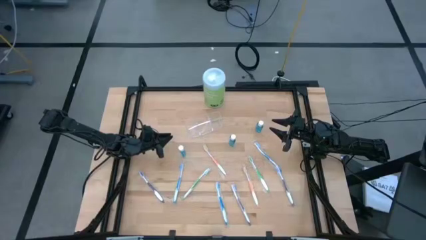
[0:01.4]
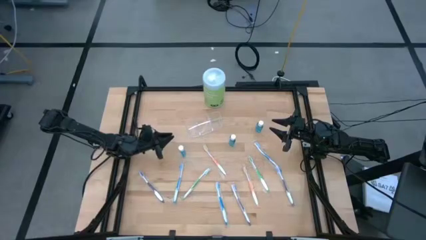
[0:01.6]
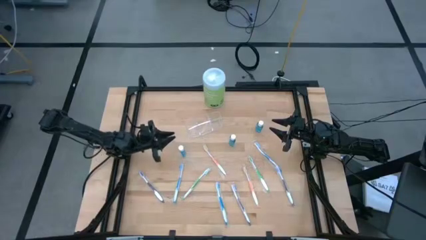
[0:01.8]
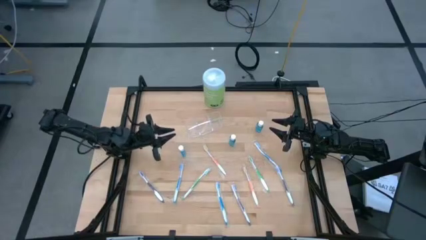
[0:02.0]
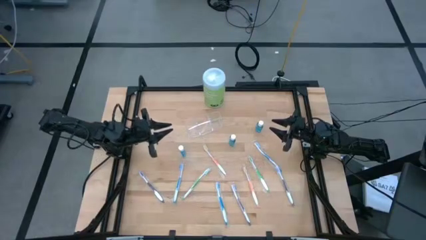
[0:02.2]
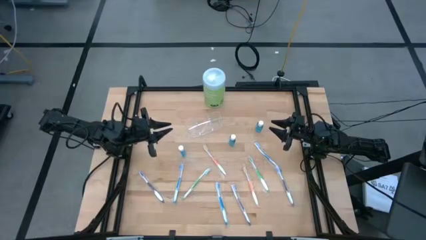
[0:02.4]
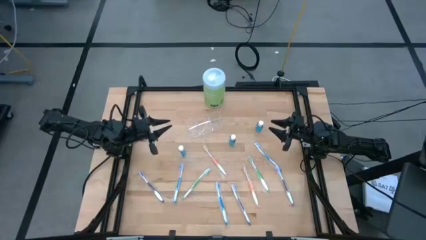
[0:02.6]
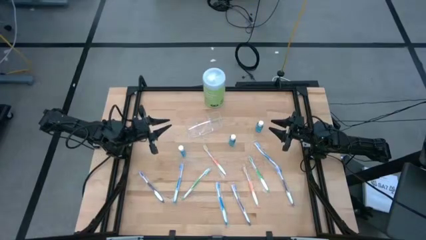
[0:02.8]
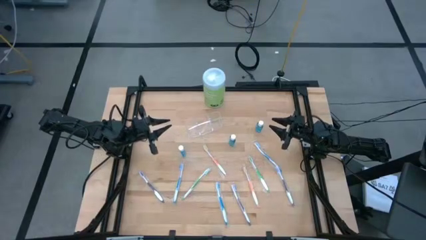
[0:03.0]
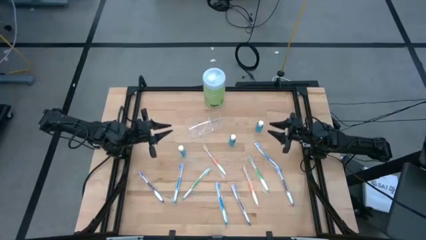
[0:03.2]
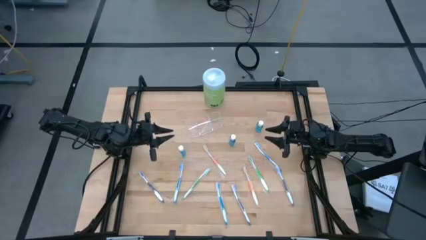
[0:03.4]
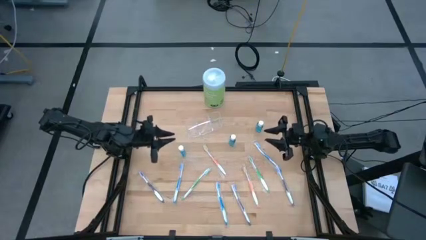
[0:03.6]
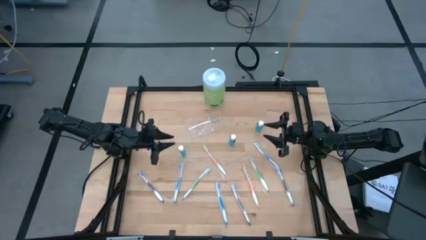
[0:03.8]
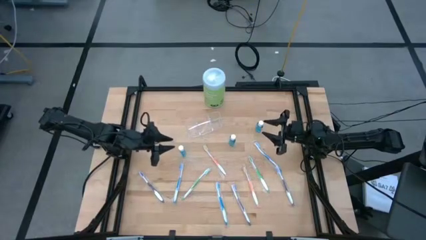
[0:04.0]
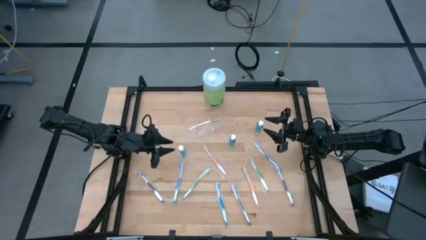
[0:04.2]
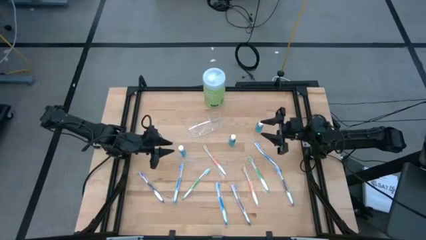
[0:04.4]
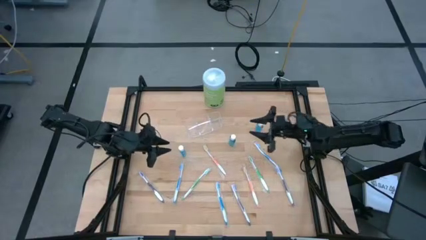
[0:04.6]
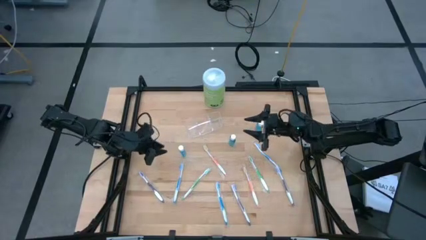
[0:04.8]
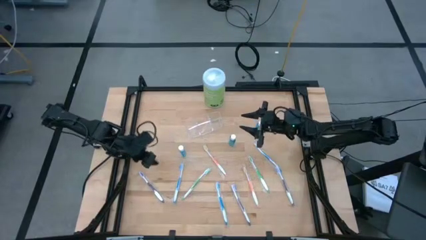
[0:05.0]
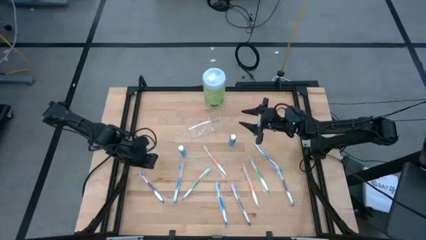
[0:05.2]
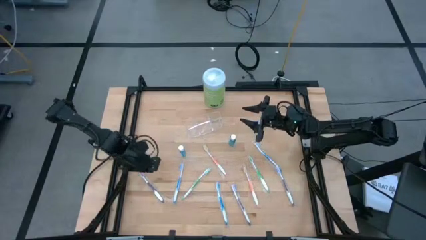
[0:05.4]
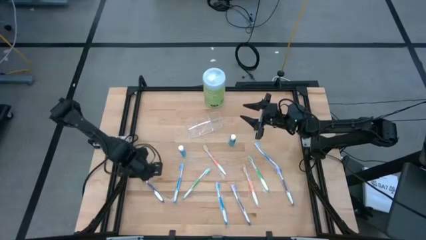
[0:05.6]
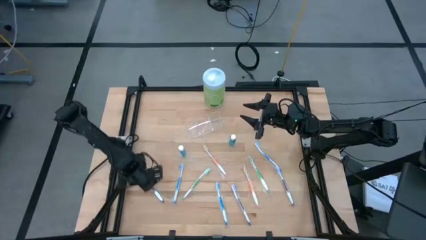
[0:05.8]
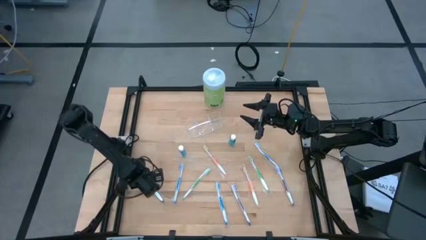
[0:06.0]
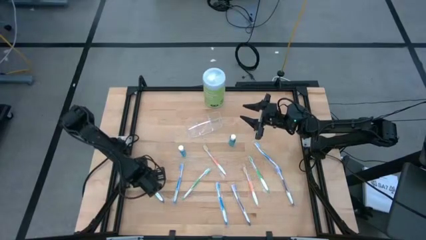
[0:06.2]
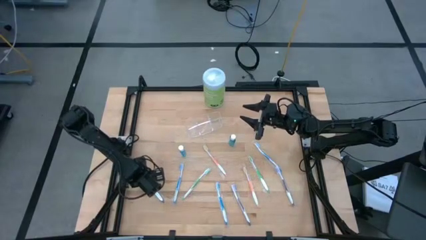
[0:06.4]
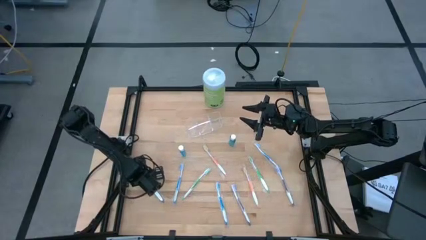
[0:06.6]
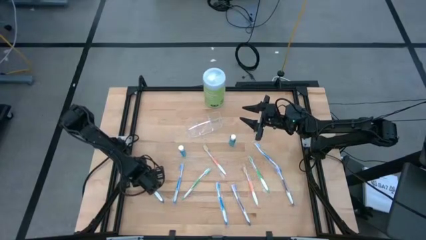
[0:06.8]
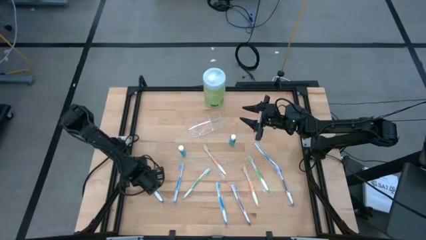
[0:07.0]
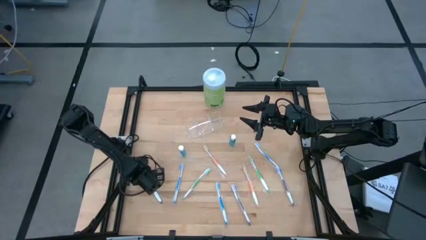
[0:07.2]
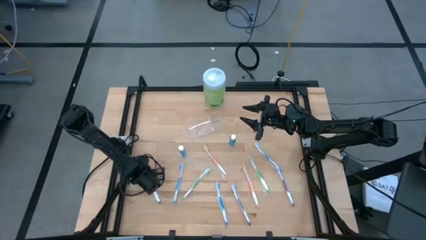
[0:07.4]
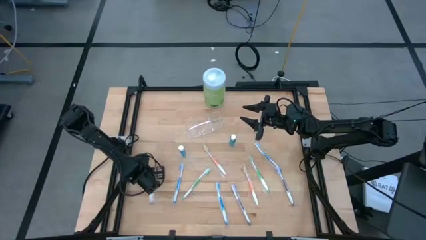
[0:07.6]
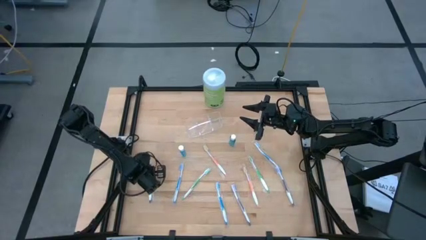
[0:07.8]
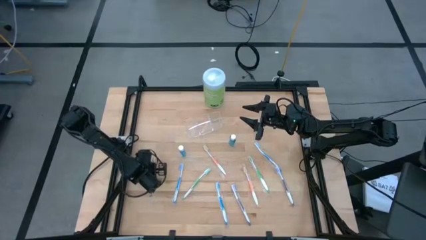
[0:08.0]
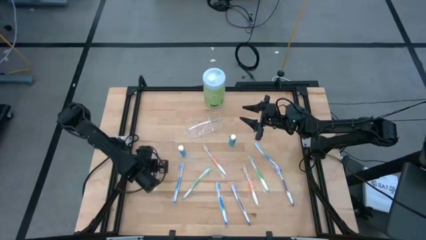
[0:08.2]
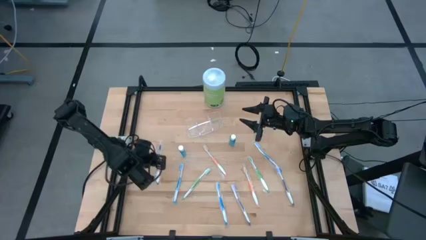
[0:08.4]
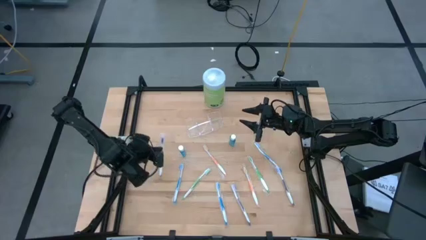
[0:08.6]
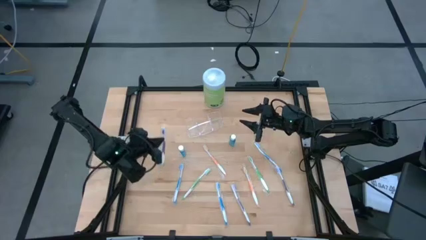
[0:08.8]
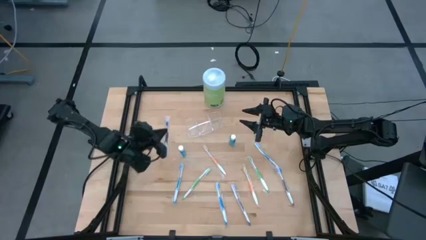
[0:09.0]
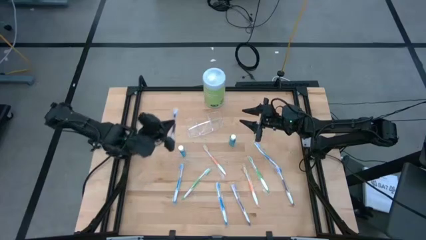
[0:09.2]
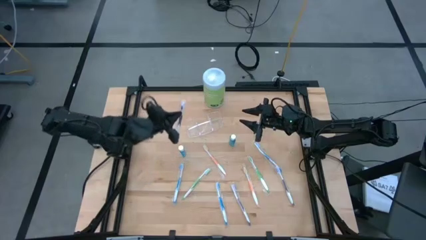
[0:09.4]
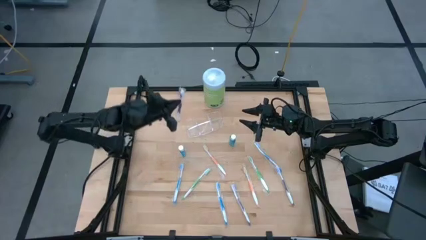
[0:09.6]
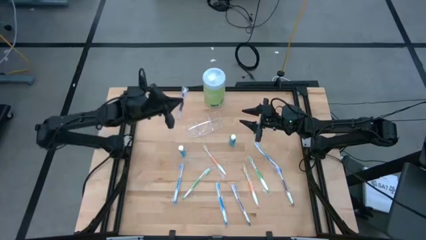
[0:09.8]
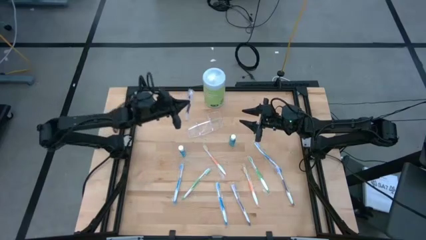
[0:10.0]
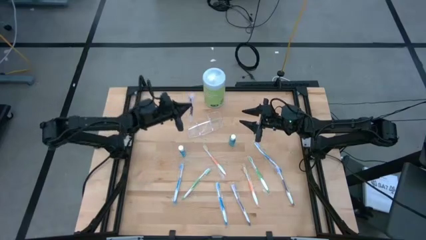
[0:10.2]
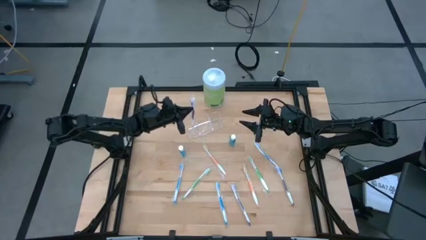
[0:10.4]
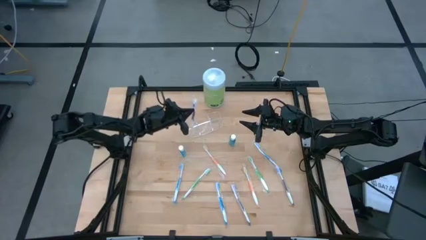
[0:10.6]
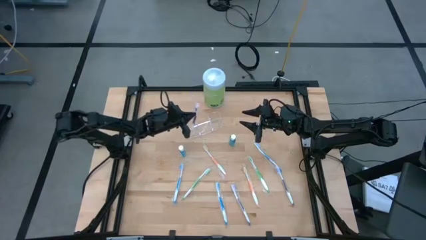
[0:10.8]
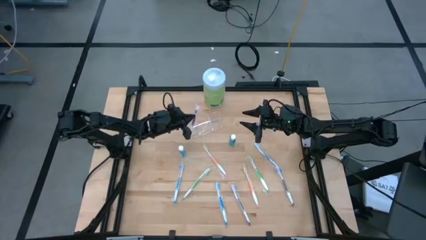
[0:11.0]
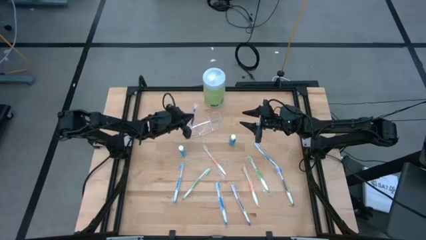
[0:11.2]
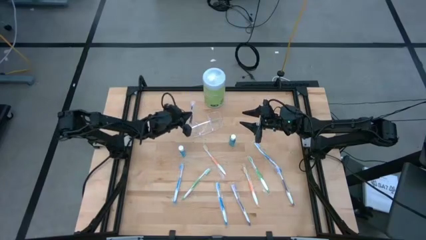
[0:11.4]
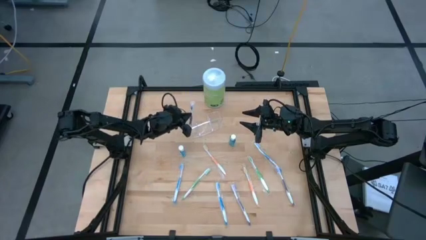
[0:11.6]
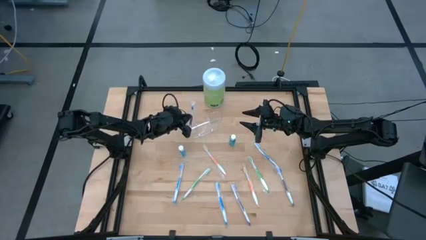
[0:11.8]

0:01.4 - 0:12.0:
Task: Pick & Place toothbrushing station
Put the left purple toothbrush into the transparent organizer

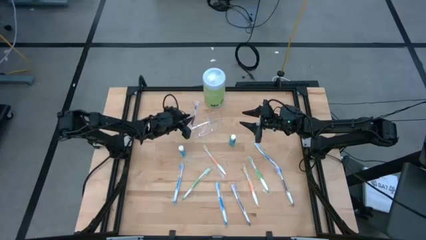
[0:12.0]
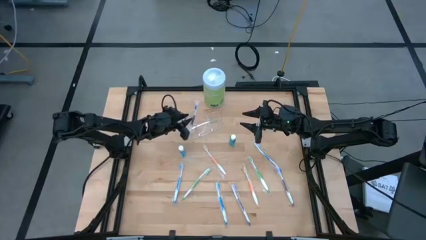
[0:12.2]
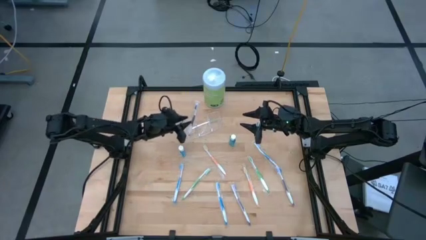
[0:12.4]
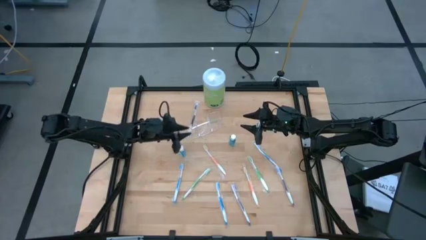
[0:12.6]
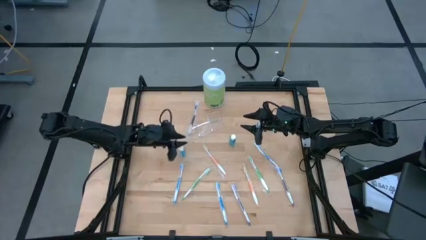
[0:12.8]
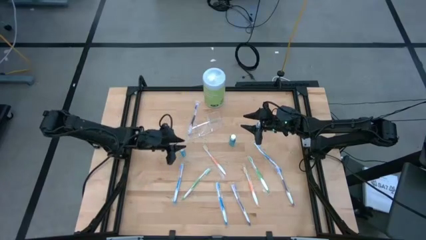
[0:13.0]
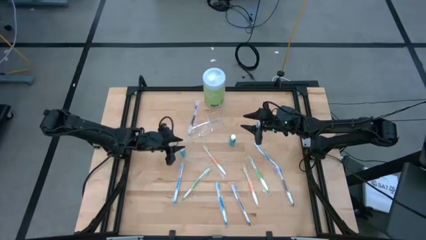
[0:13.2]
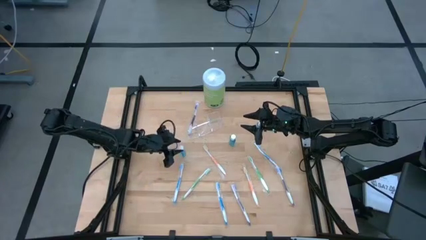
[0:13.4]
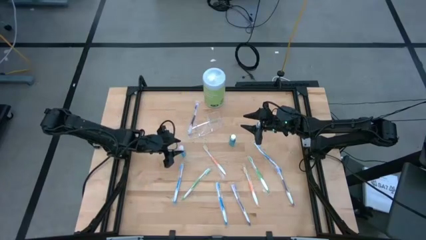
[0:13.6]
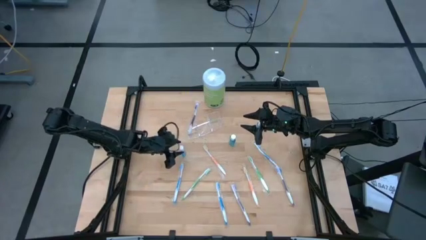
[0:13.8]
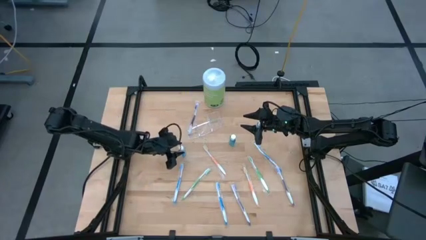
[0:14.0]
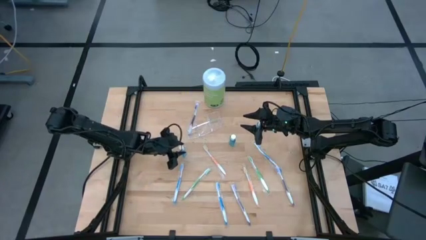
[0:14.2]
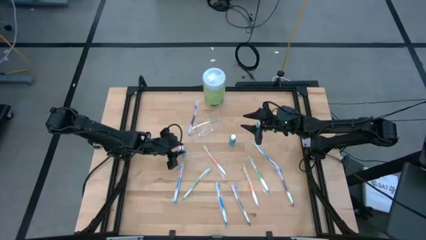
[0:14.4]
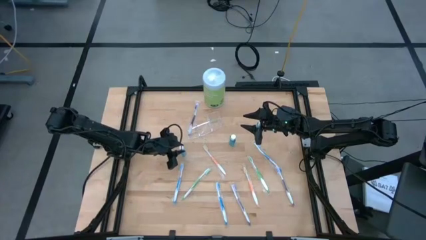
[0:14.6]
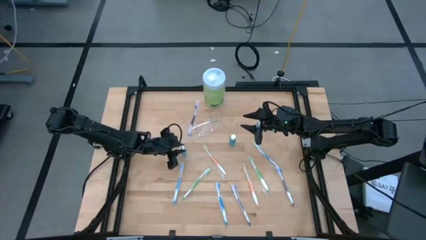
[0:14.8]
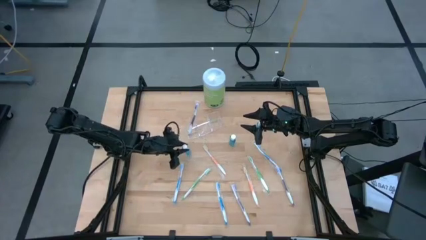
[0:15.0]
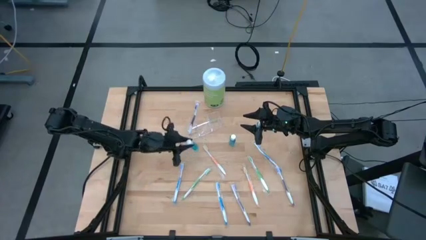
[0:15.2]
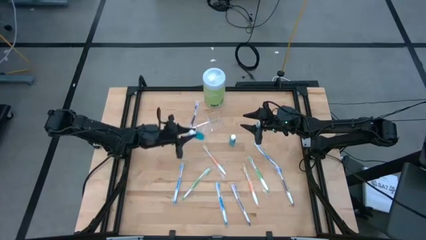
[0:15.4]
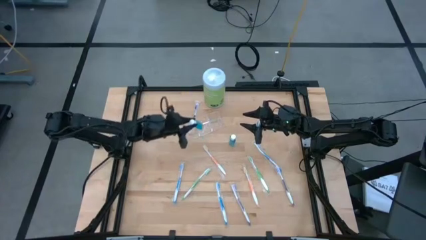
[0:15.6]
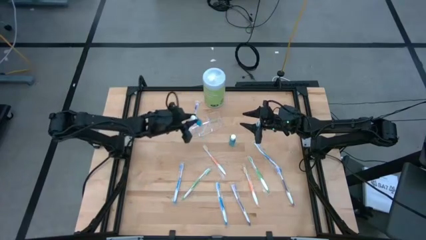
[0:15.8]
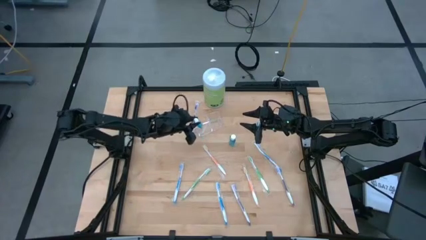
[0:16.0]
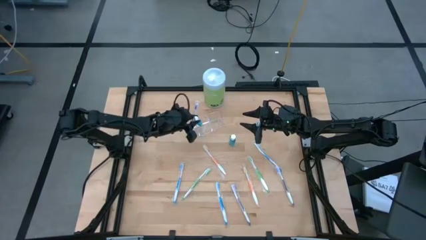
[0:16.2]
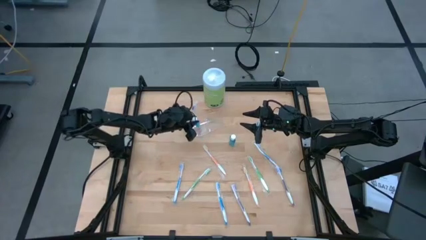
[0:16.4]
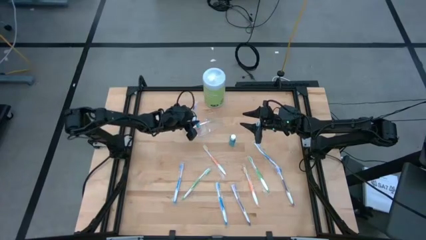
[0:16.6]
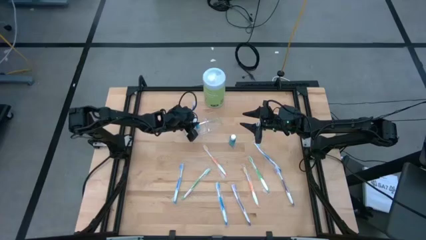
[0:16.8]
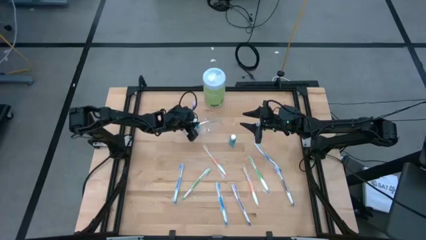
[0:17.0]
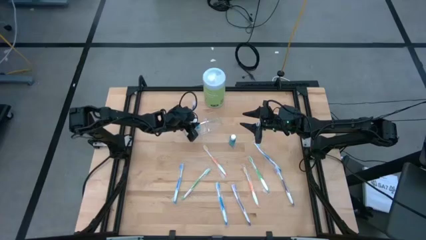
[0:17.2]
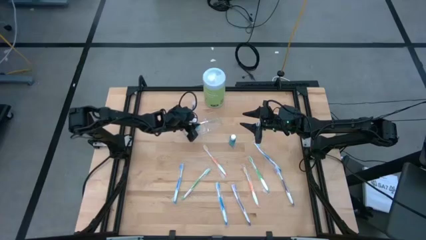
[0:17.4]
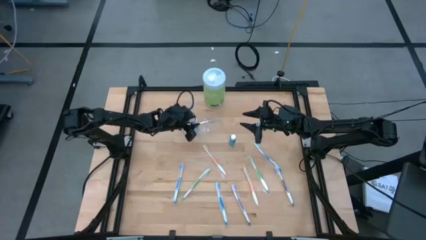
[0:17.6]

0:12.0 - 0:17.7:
Put the bottom left mouthwash into the transparent organizer
